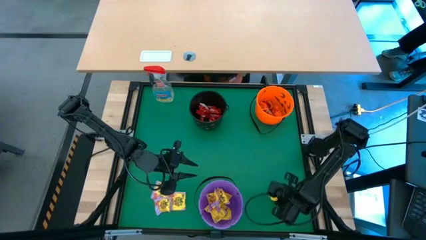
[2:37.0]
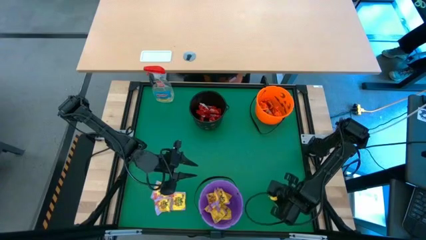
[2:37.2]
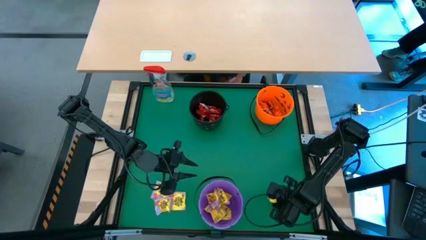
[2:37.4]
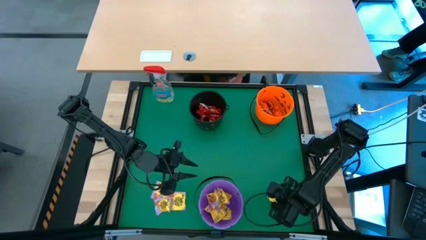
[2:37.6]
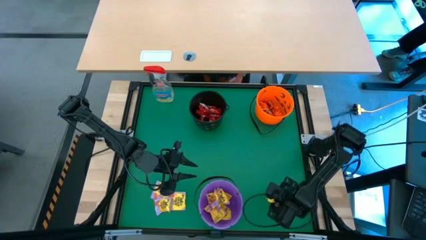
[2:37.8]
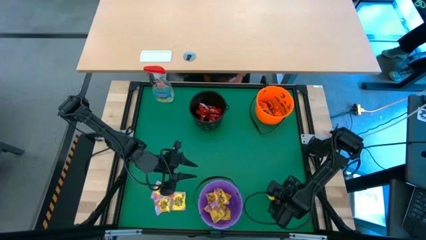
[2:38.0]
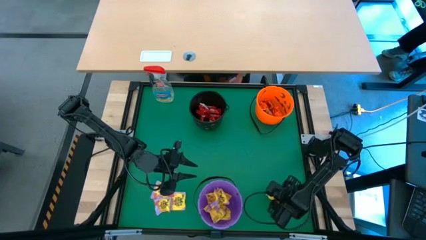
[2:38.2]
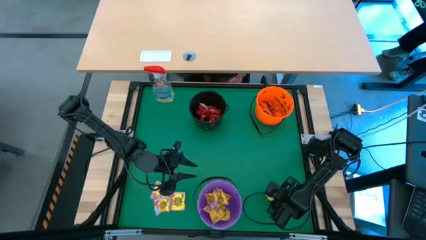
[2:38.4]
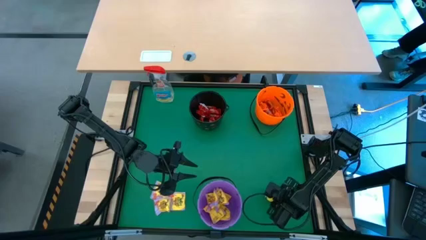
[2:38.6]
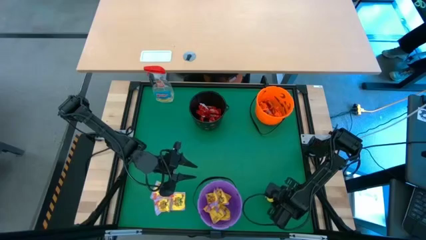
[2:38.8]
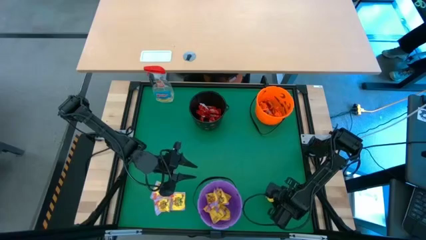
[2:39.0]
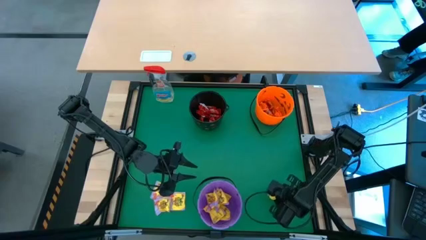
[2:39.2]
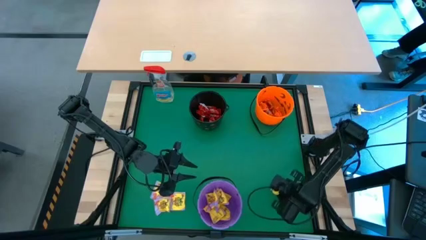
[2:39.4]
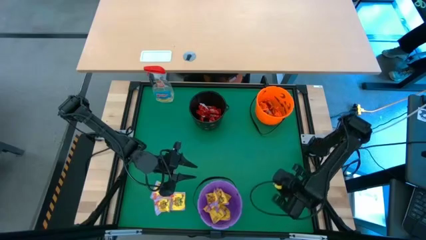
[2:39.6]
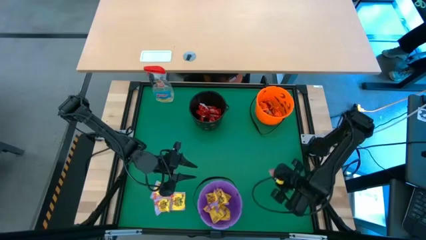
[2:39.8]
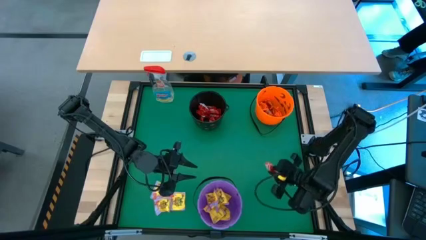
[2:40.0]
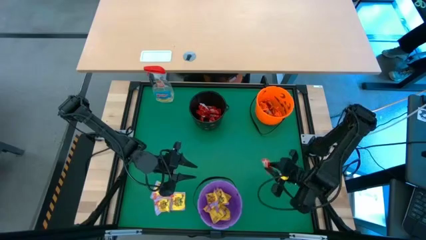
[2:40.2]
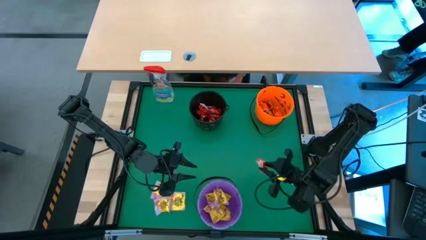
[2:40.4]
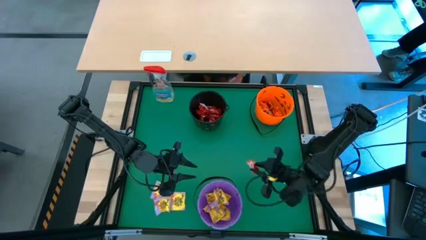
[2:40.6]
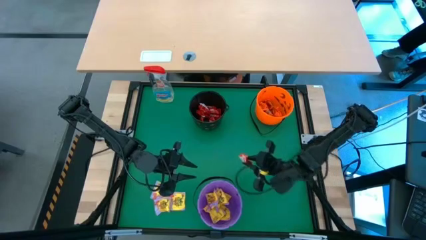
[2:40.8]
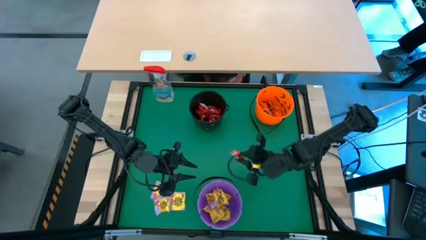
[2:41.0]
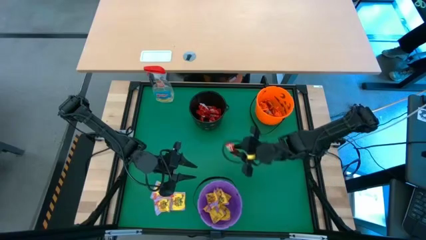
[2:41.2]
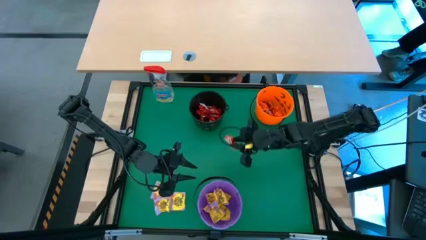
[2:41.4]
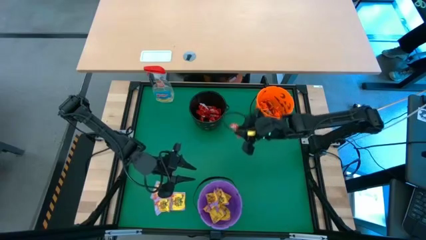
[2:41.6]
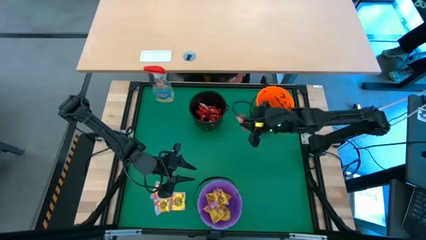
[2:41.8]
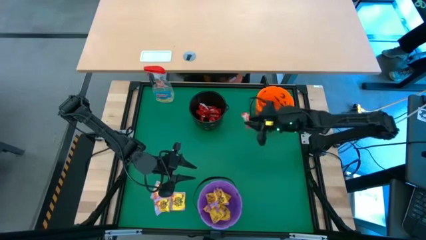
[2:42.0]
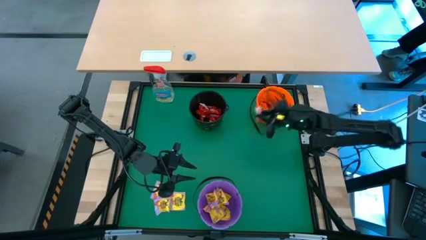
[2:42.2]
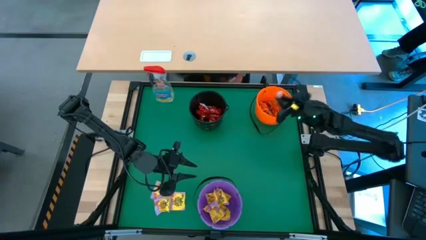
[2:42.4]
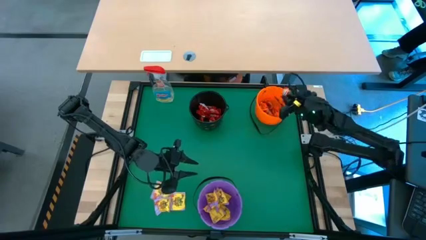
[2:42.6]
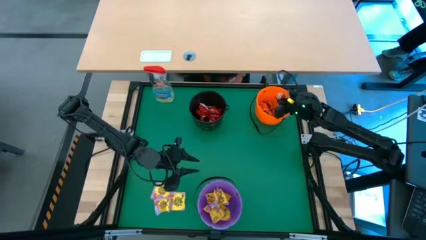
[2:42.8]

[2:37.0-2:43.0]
Task: Sort candy
Put the orange chocolate into the orange bucket

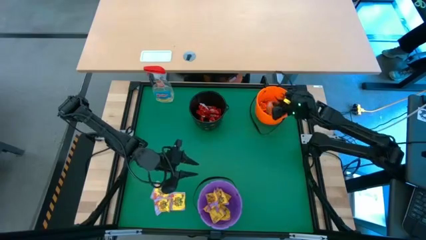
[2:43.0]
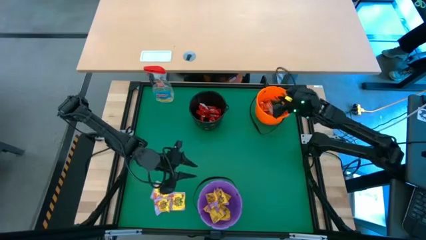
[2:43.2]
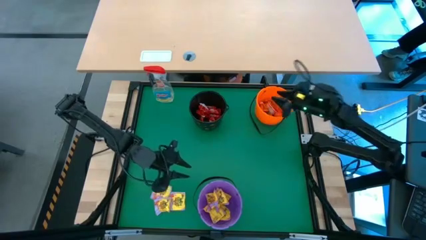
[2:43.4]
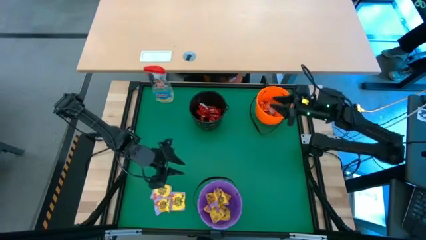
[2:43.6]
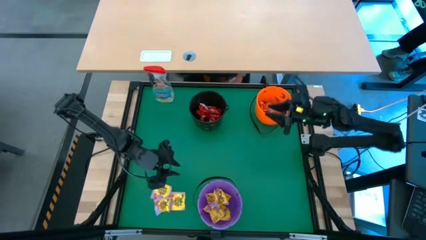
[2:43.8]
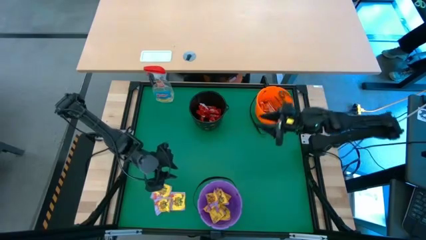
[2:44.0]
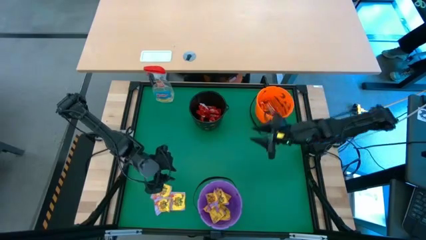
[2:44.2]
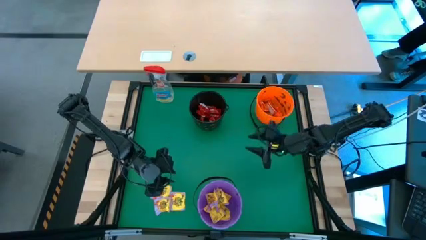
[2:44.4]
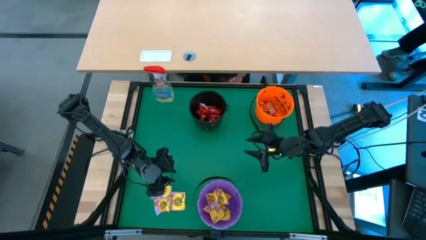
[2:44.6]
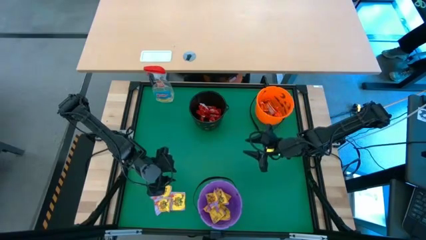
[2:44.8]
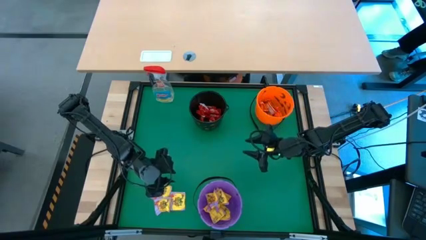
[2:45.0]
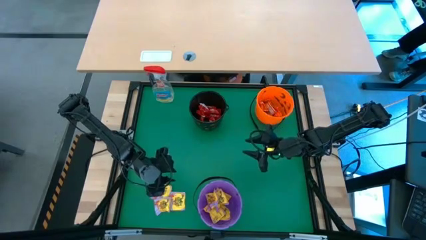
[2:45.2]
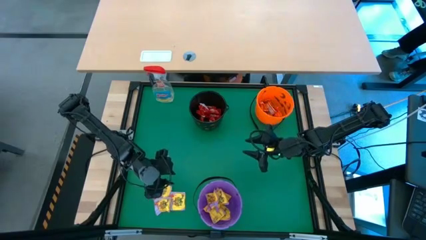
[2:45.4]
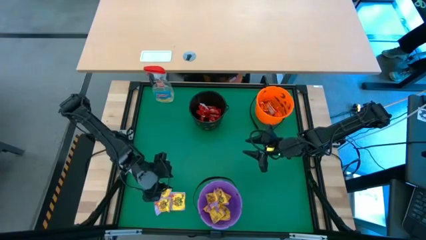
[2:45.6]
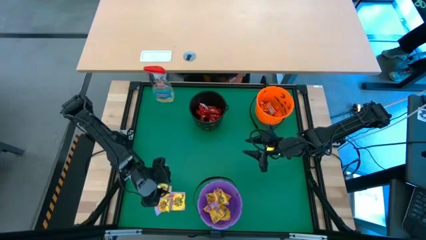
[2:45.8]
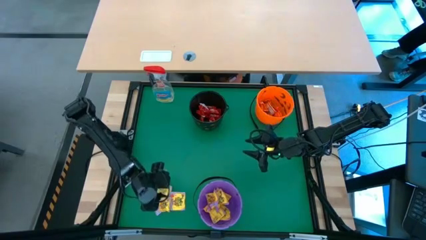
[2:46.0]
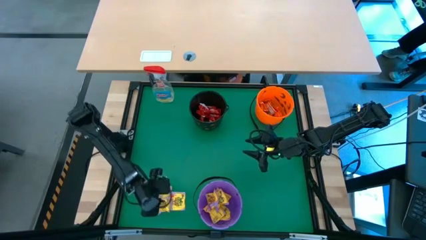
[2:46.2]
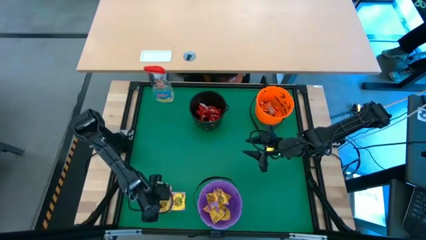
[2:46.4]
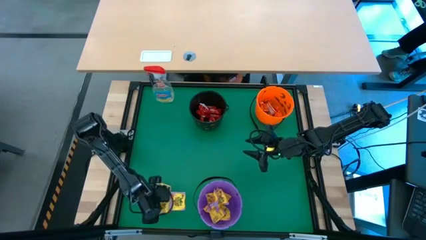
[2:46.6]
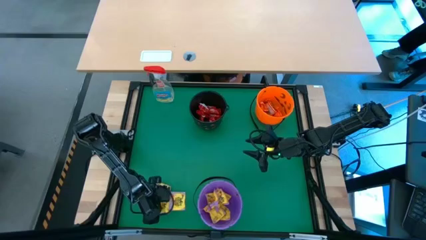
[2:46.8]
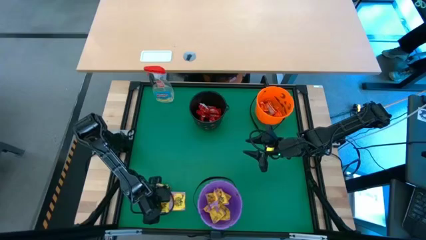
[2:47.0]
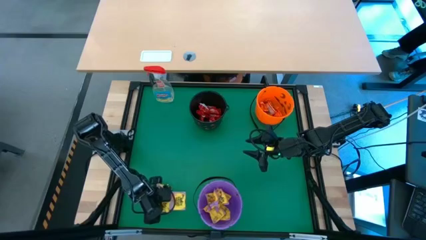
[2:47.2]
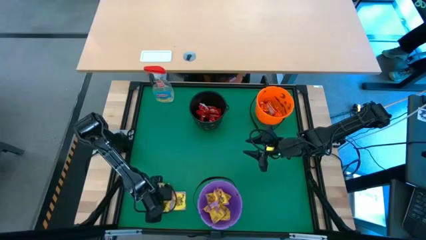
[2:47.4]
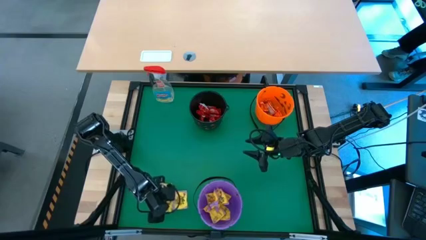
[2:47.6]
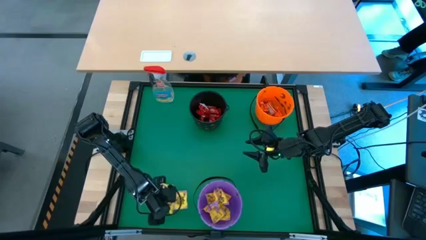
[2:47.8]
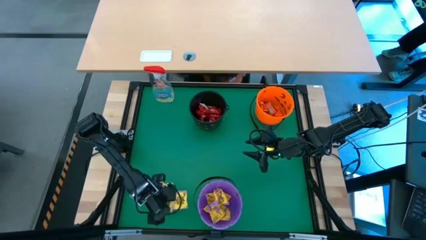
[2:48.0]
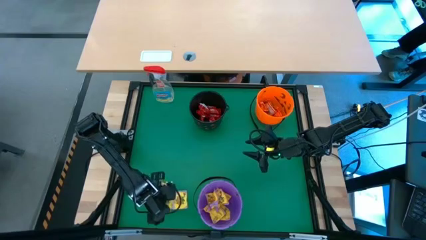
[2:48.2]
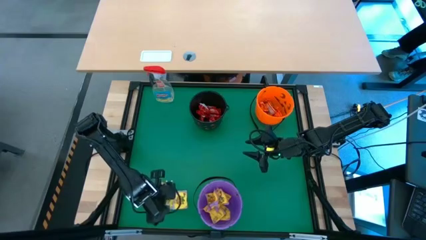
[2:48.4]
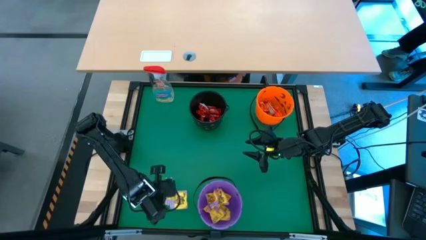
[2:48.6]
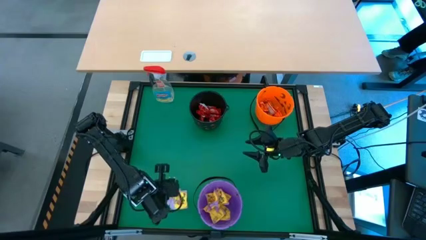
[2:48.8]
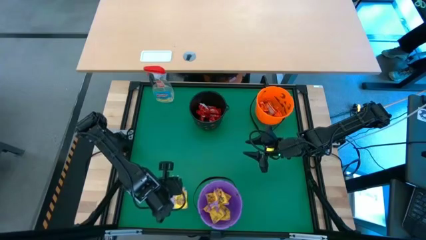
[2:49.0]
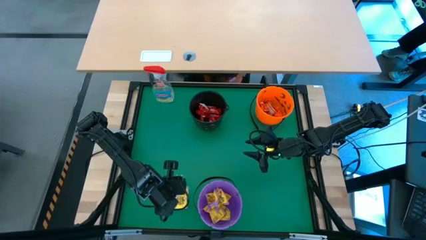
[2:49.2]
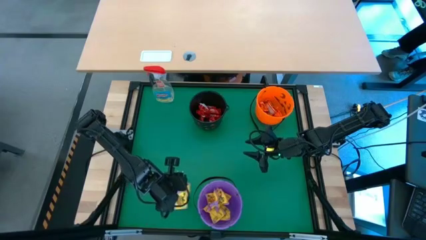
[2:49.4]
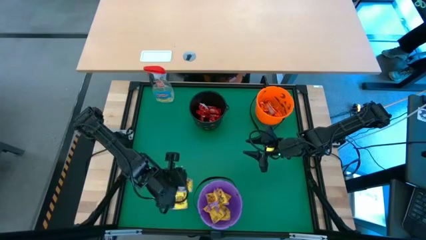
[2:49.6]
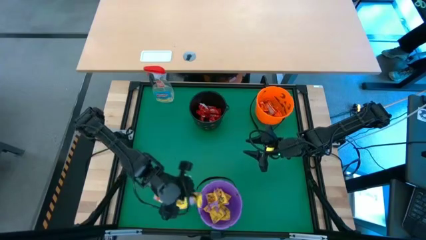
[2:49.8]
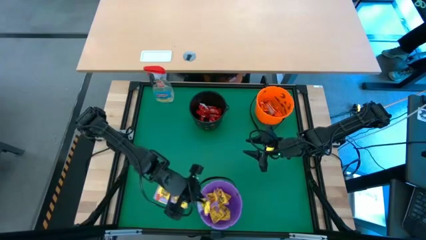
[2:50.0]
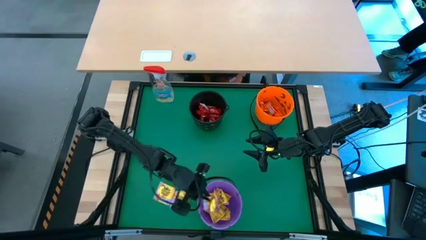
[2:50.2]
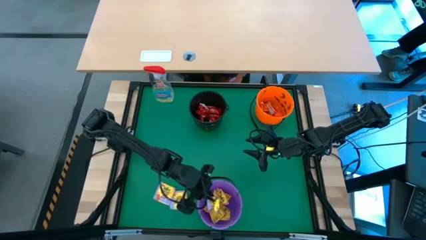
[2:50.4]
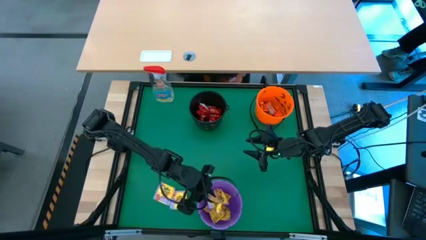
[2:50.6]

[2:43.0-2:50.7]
Put the yellow candy into the violet bucket

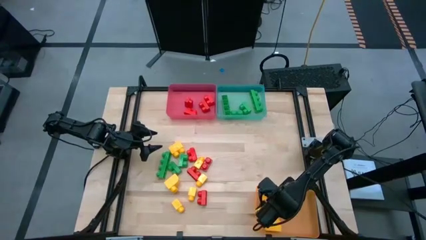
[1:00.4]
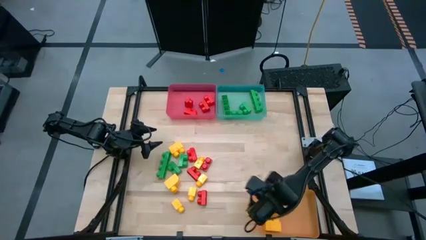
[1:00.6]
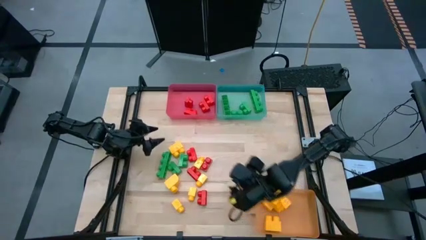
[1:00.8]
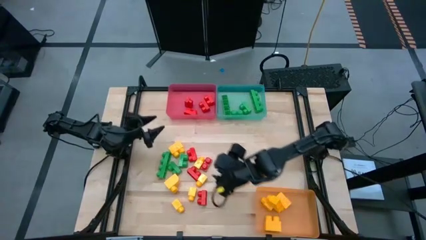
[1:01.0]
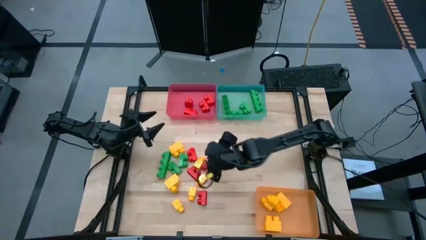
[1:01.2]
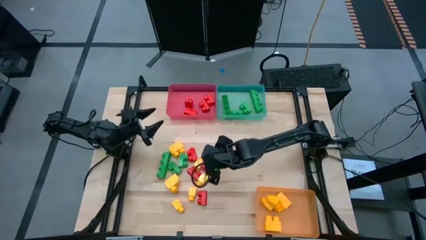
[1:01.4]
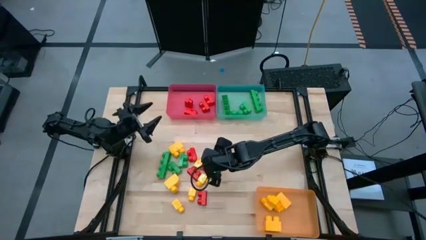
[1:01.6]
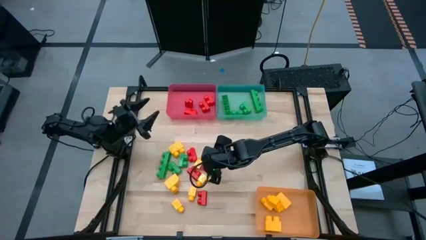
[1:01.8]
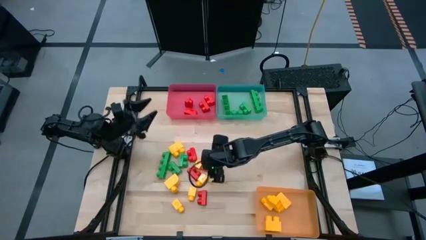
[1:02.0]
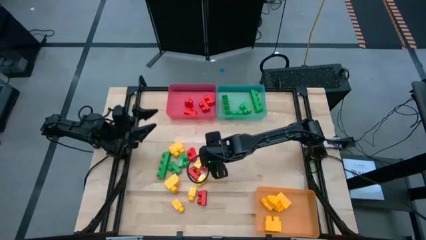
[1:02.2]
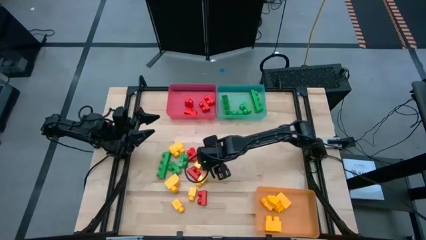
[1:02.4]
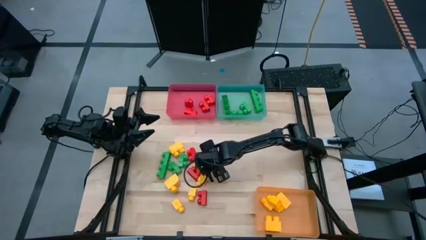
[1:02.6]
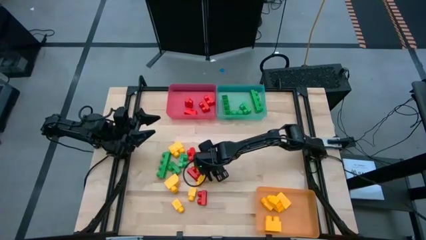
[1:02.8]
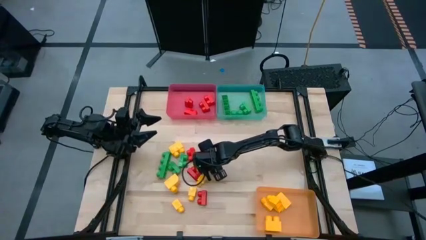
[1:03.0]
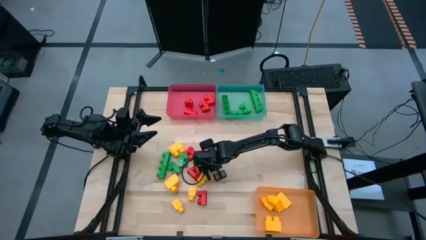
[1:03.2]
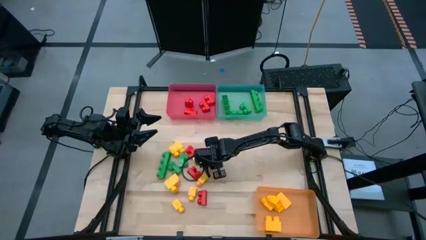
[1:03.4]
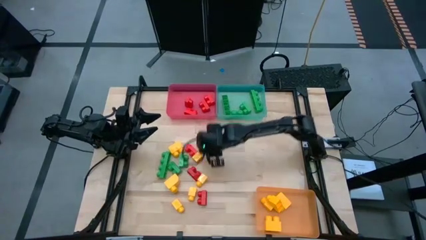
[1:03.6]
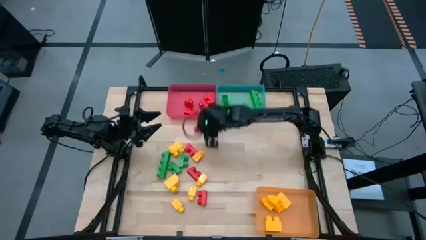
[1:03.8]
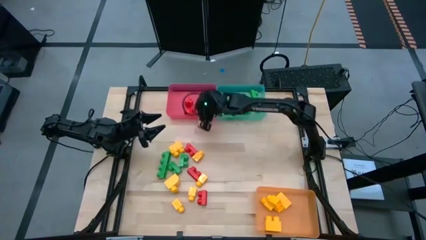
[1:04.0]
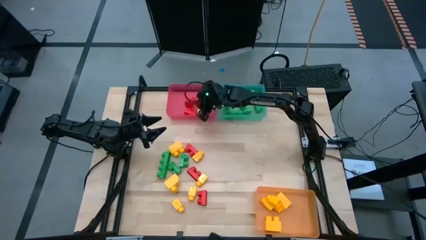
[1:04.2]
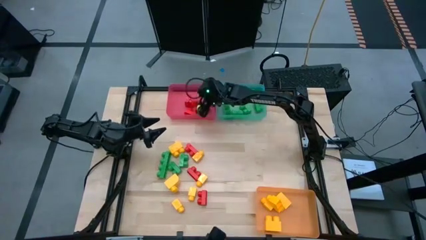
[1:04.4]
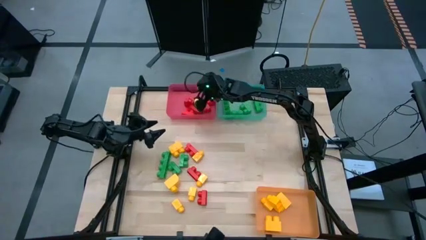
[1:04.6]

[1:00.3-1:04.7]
Task: Sort blocks
Put the red game piece into the red bin
